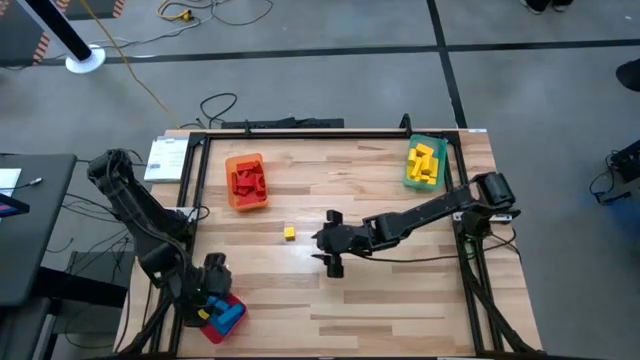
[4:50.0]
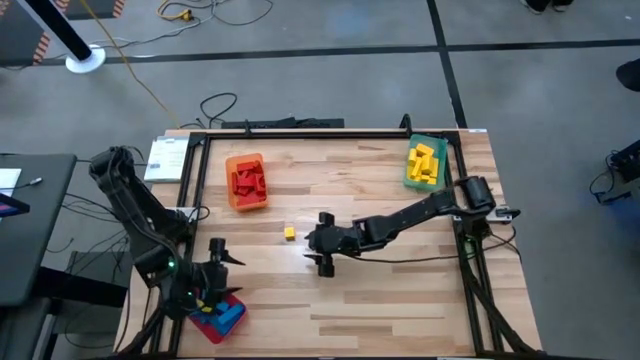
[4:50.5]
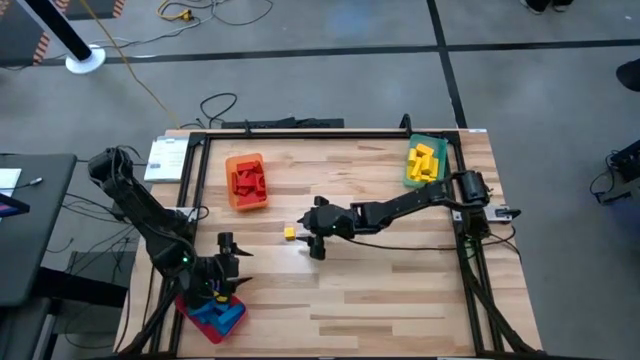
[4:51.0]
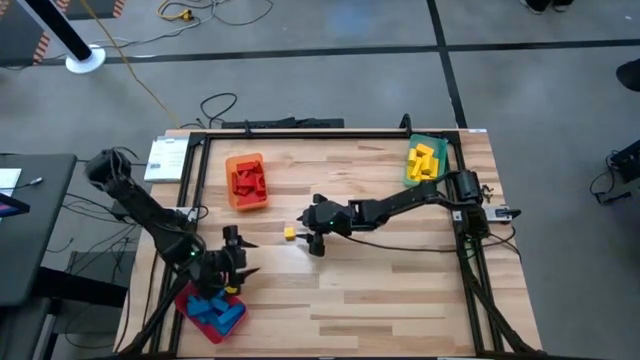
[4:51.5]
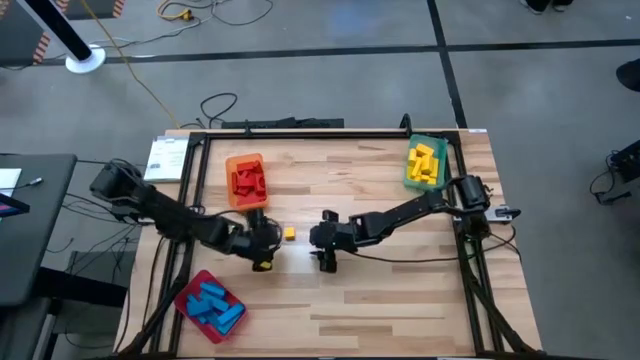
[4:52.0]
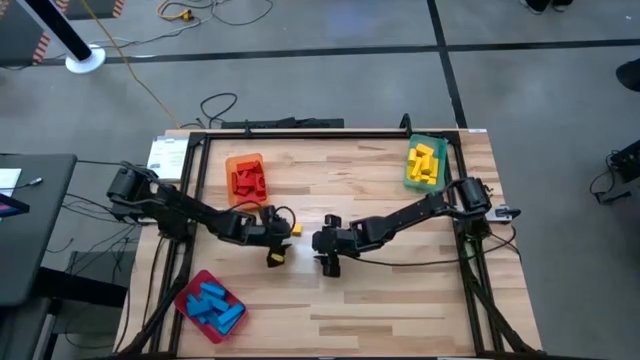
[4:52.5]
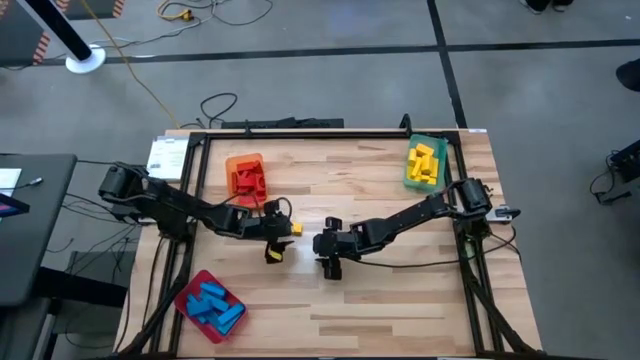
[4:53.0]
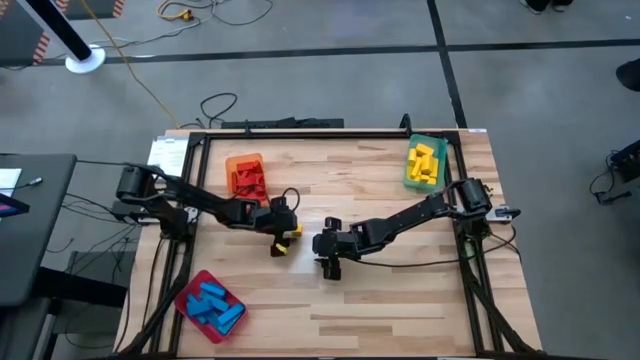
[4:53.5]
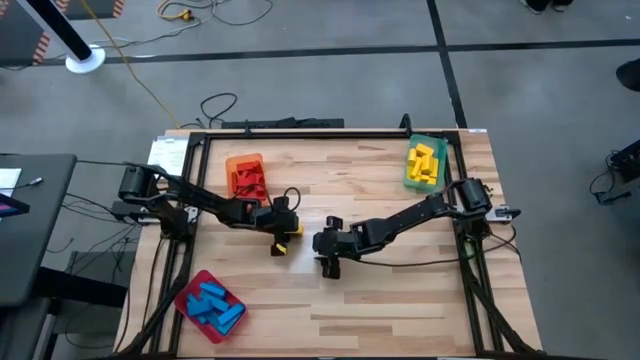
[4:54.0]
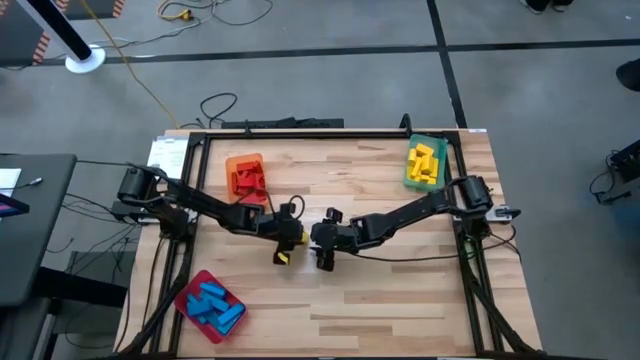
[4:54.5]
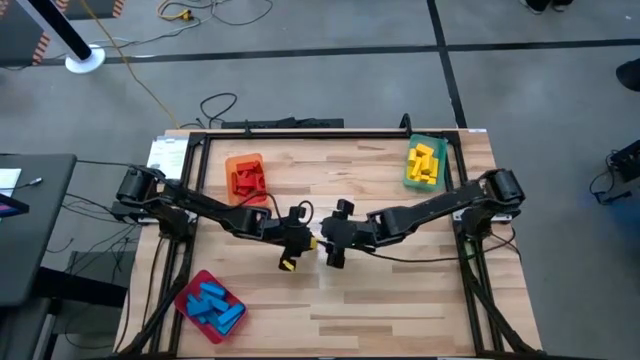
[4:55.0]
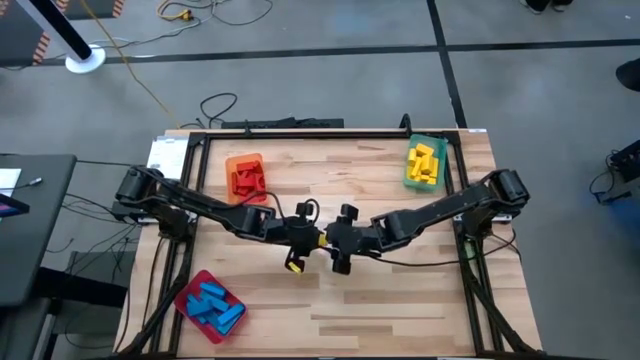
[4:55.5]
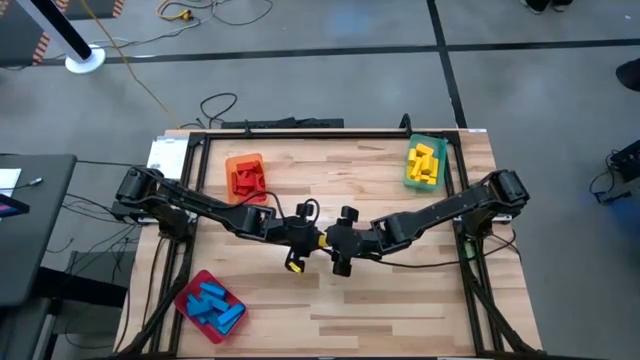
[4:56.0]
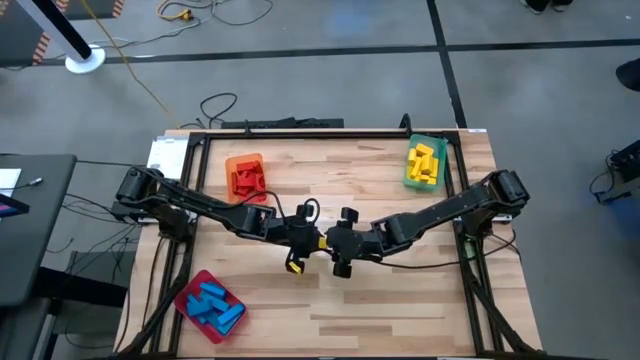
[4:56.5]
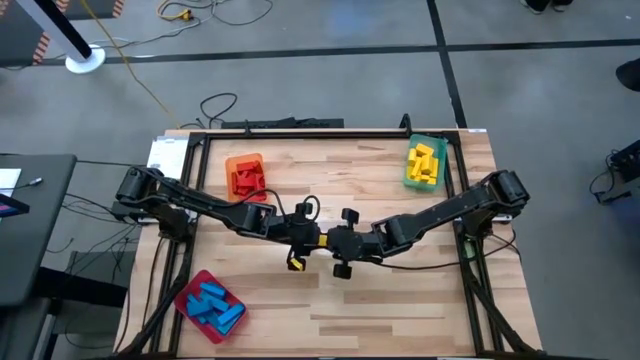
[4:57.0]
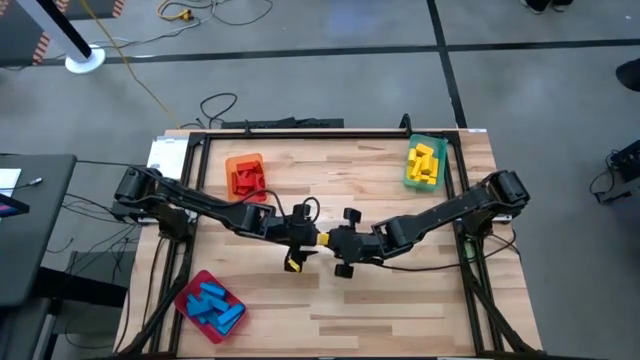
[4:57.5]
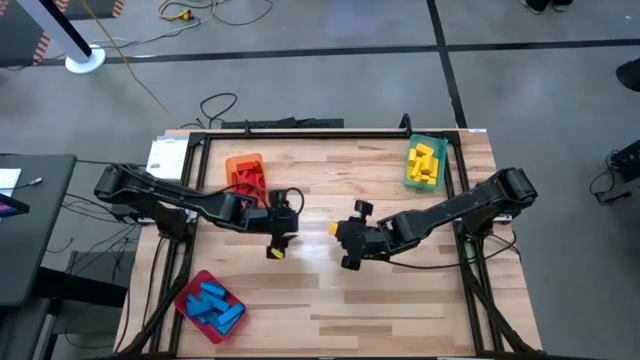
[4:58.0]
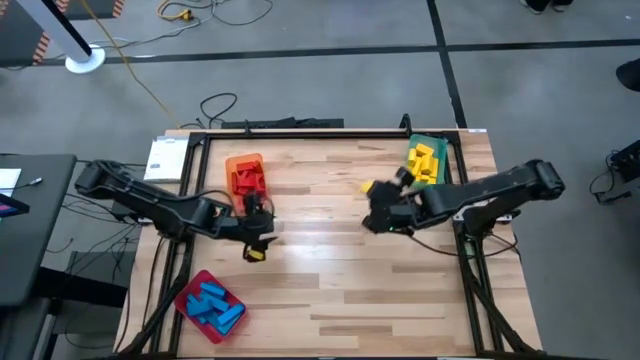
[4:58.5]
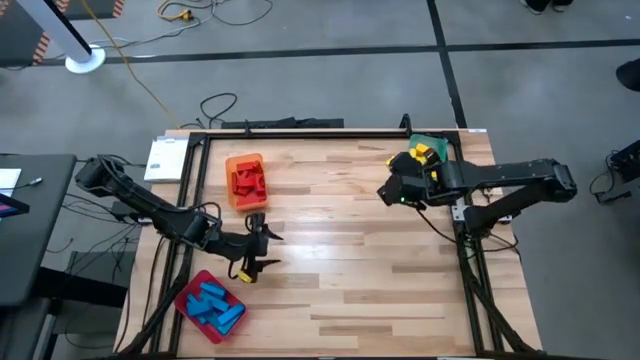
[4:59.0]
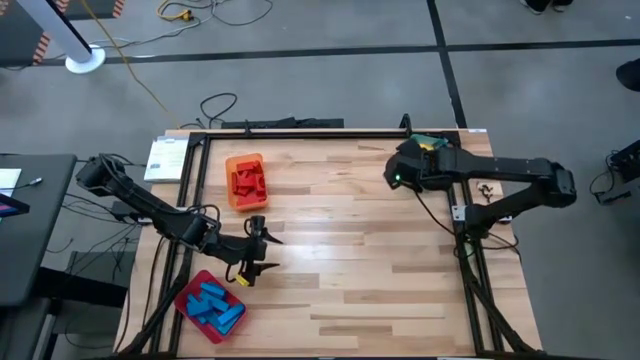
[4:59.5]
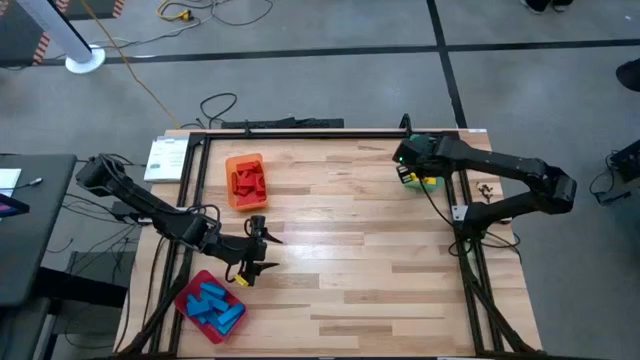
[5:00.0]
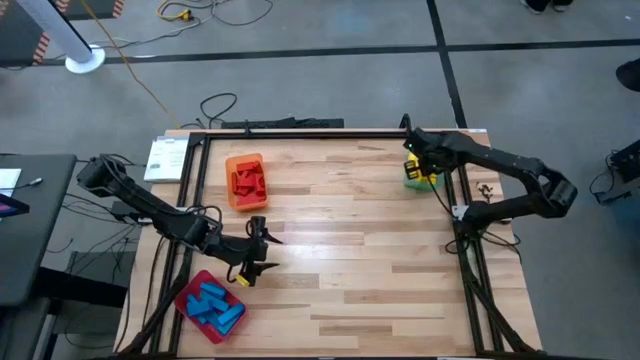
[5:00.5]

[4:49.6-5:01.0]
Task: Sort blocks
Put the yellow wooden block into the green bin

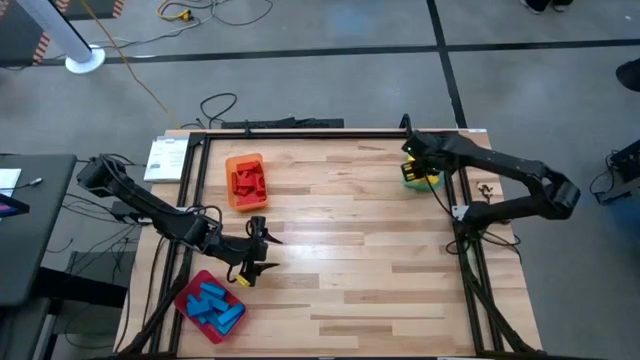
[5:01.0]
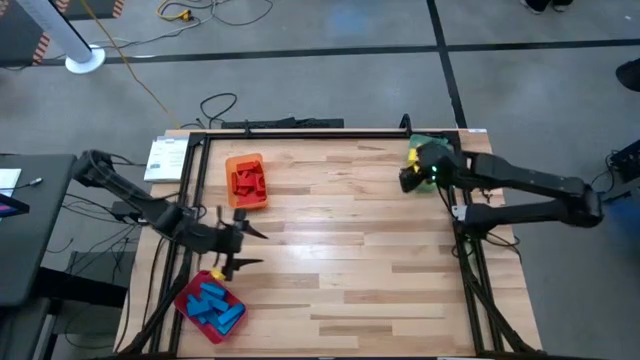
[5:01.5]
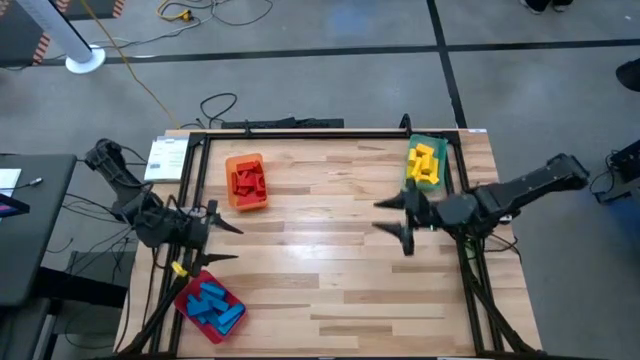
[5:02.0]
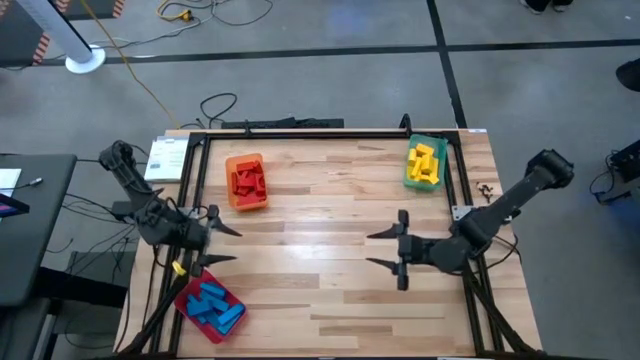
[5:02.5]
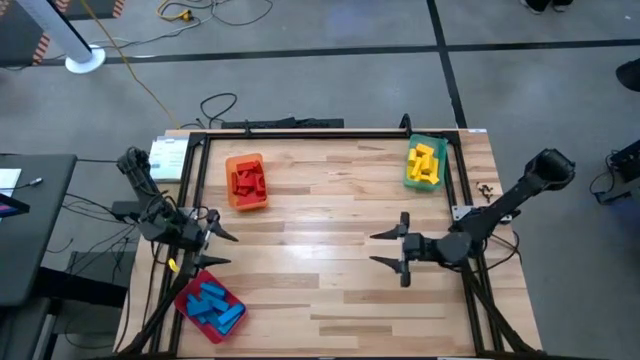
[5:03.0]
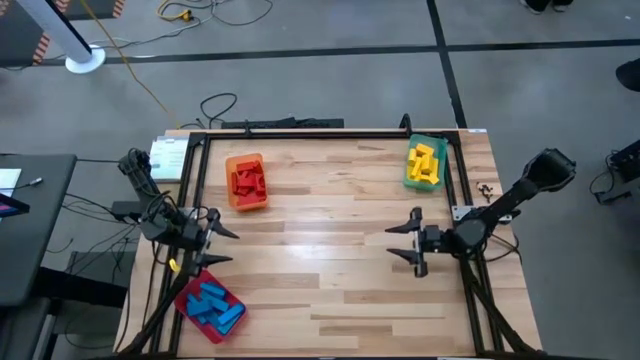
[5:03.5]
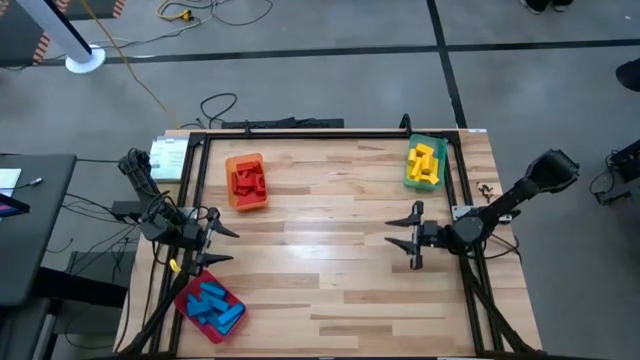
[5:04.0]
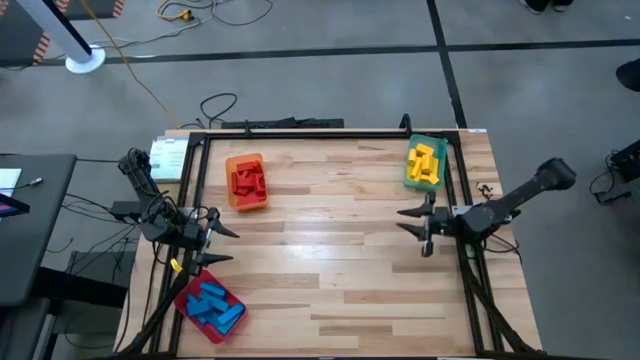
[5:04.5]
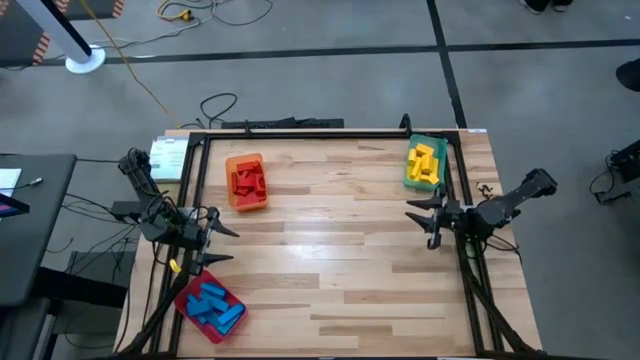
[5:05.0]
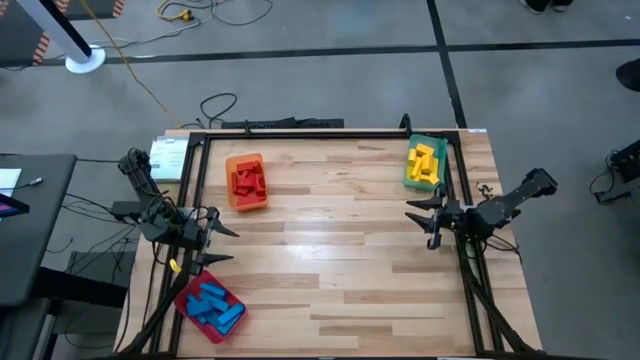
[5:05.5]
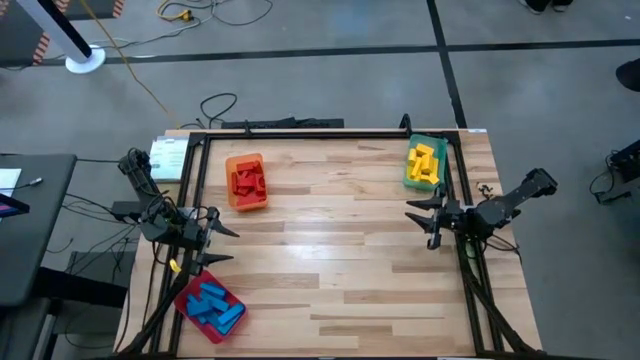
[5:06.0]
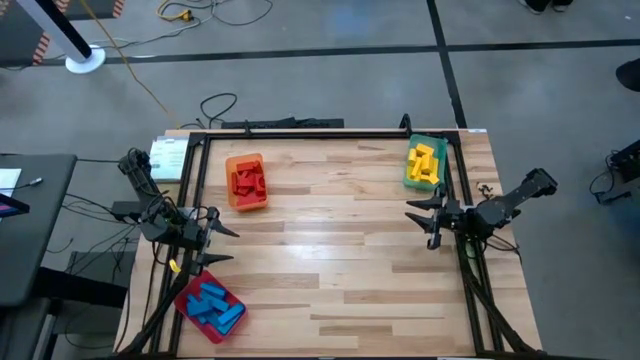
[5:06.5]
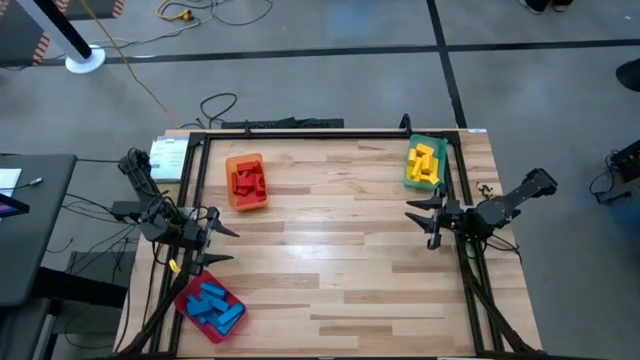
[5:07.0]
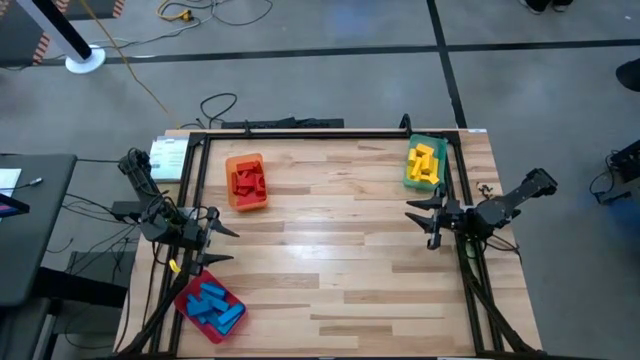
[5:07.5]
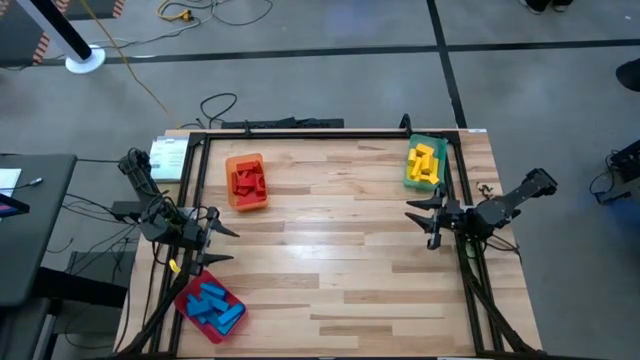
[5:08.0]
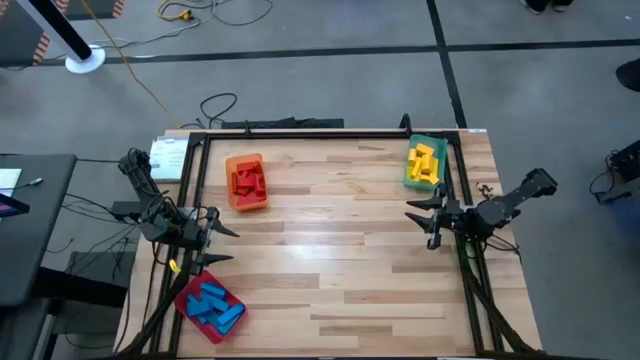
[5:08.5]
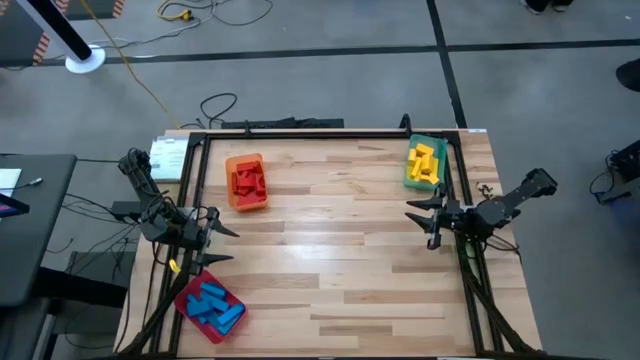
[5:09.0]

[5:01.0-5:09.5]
Return to Home Position
